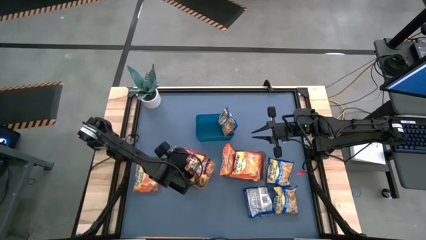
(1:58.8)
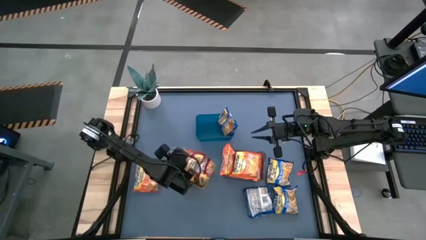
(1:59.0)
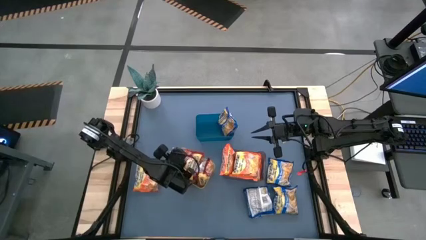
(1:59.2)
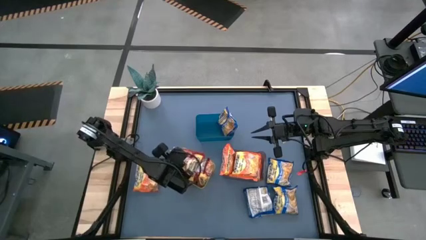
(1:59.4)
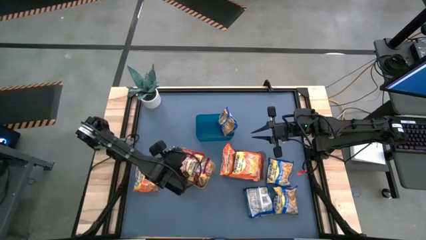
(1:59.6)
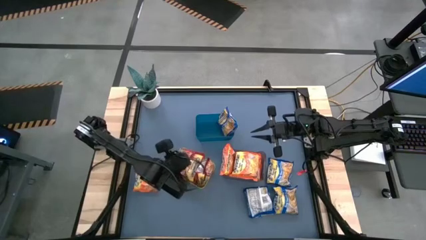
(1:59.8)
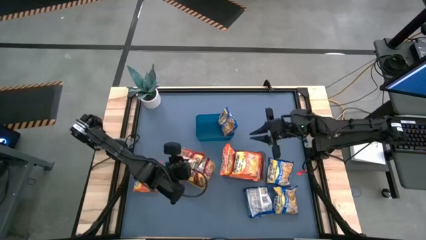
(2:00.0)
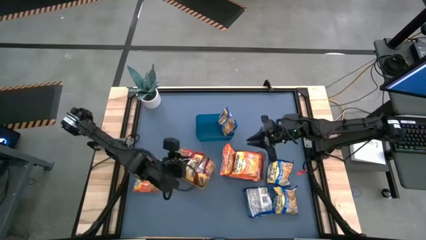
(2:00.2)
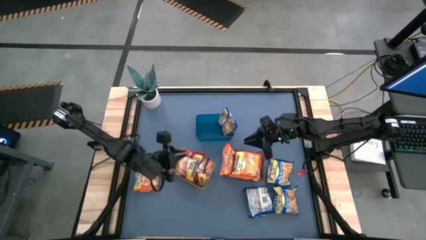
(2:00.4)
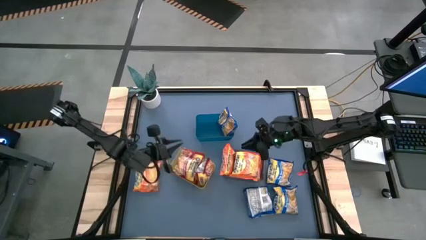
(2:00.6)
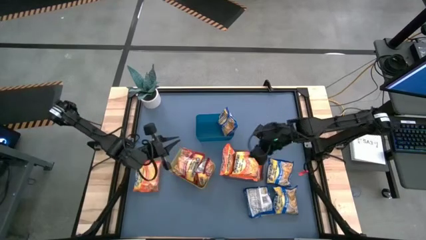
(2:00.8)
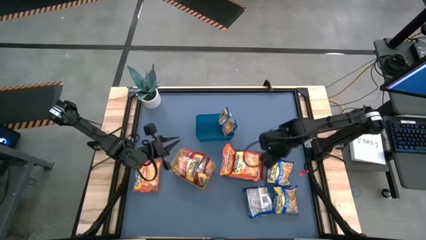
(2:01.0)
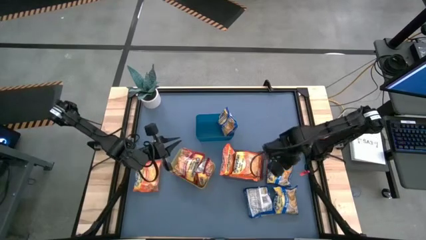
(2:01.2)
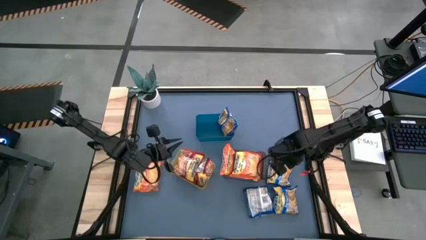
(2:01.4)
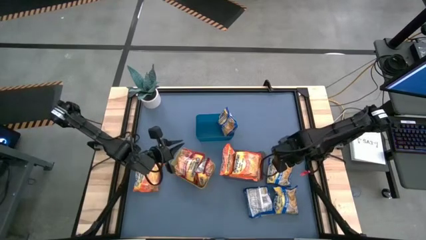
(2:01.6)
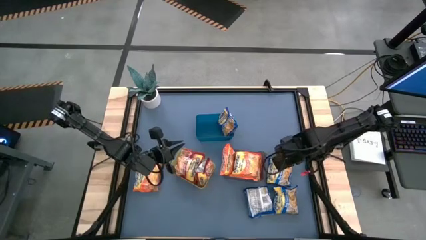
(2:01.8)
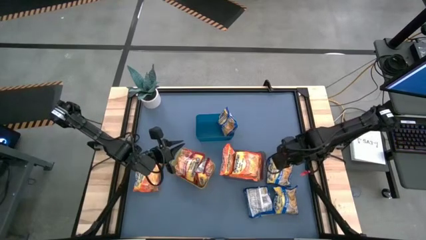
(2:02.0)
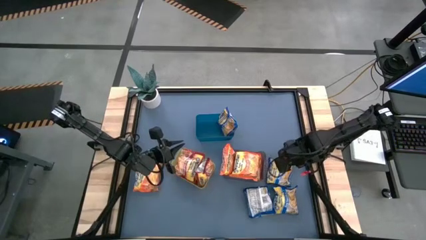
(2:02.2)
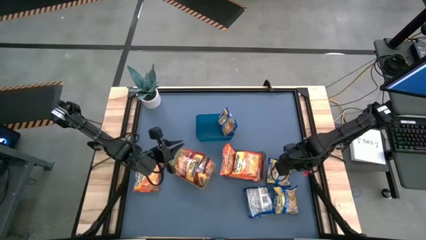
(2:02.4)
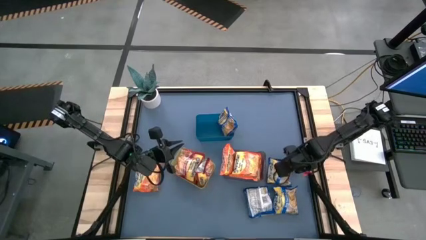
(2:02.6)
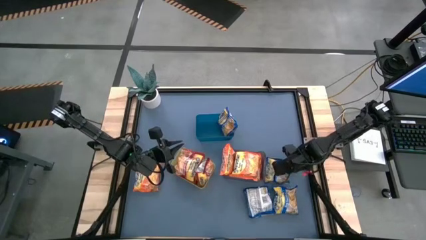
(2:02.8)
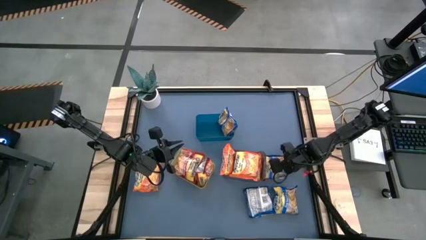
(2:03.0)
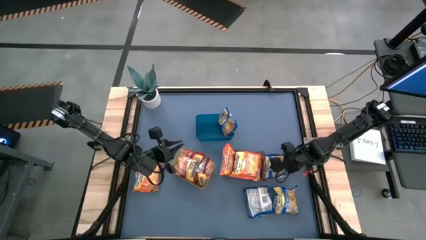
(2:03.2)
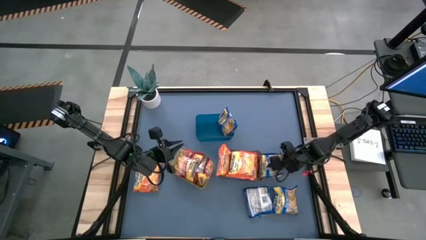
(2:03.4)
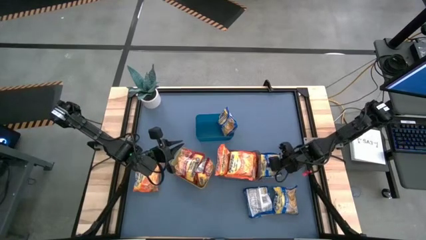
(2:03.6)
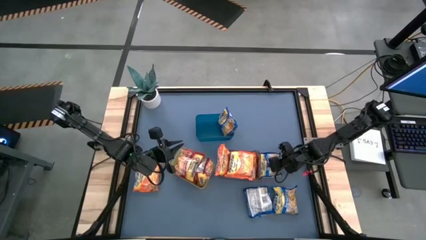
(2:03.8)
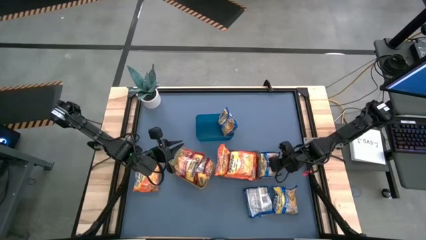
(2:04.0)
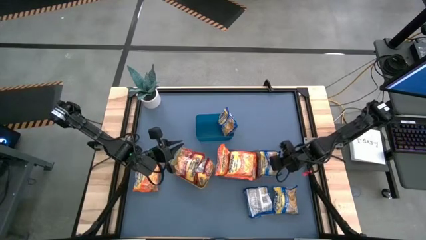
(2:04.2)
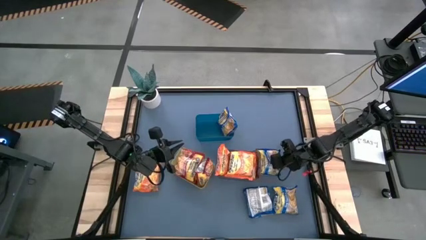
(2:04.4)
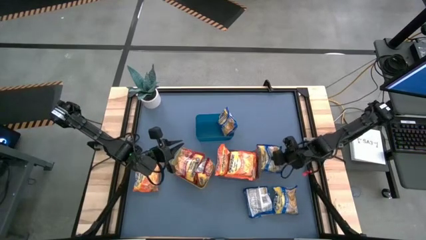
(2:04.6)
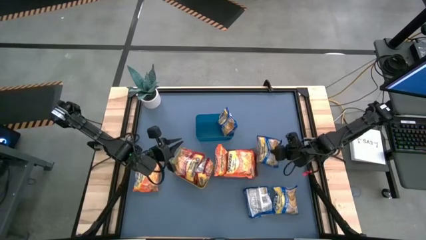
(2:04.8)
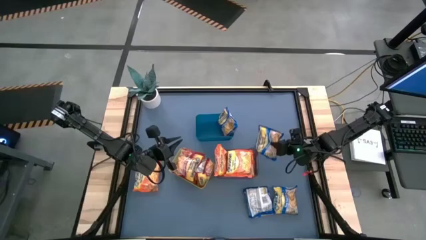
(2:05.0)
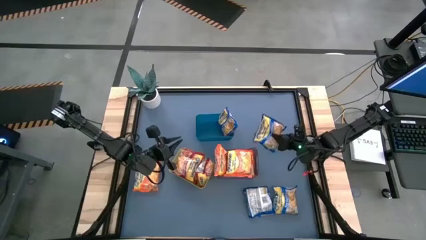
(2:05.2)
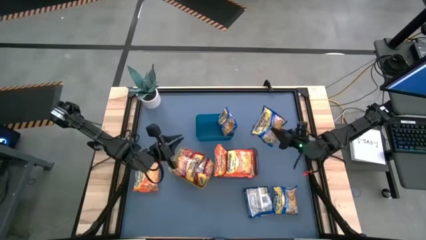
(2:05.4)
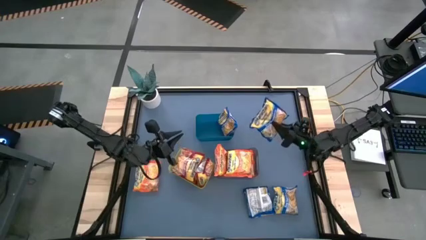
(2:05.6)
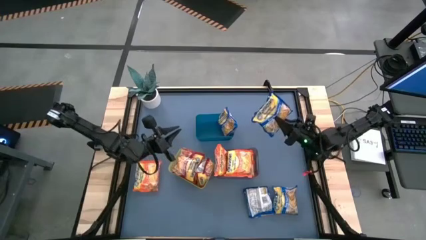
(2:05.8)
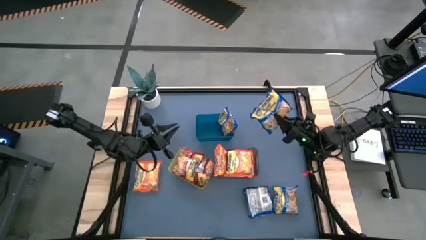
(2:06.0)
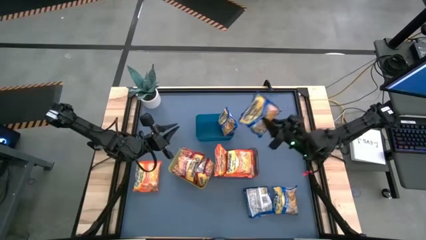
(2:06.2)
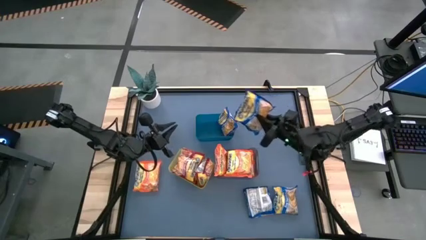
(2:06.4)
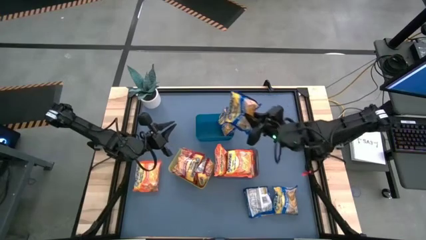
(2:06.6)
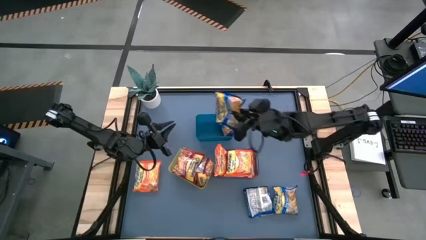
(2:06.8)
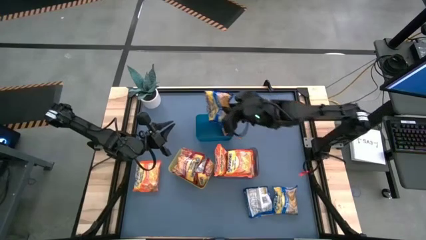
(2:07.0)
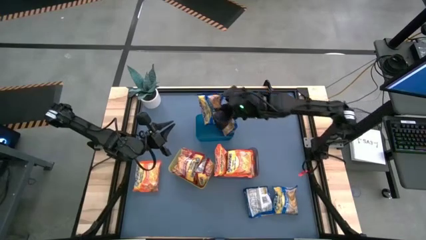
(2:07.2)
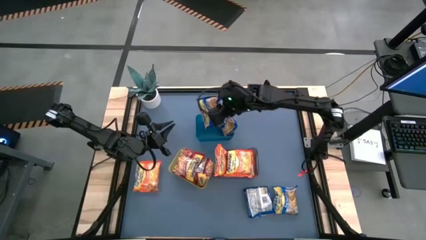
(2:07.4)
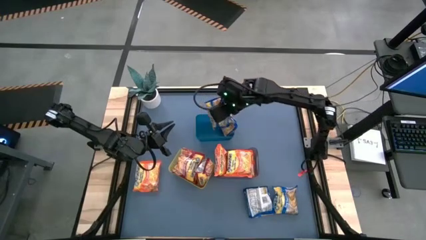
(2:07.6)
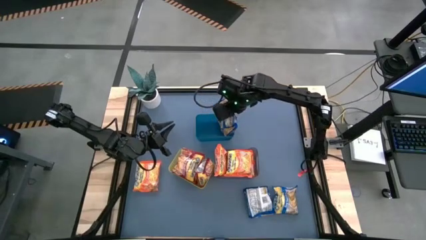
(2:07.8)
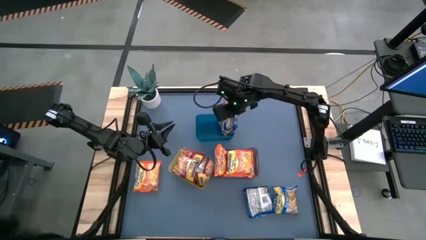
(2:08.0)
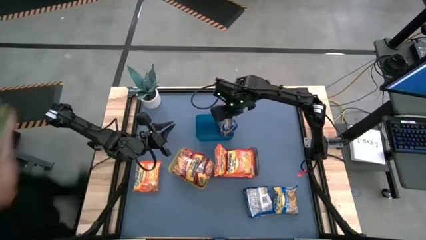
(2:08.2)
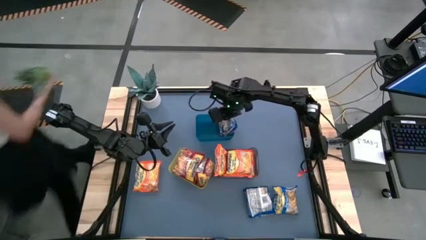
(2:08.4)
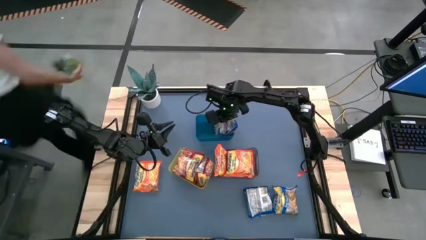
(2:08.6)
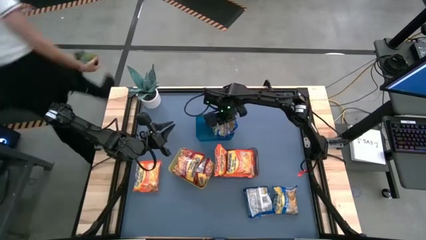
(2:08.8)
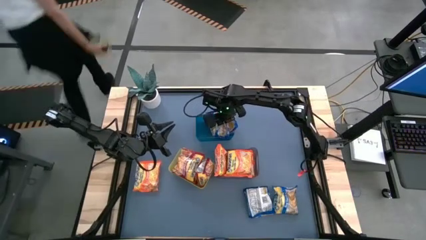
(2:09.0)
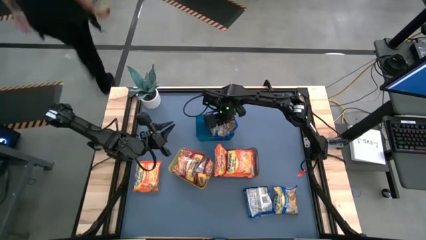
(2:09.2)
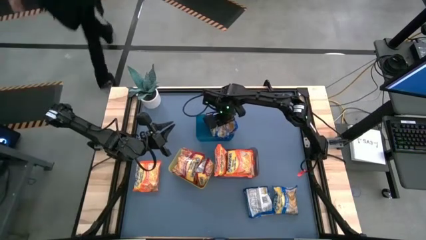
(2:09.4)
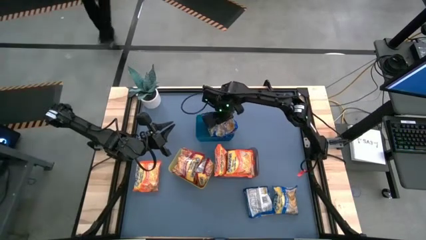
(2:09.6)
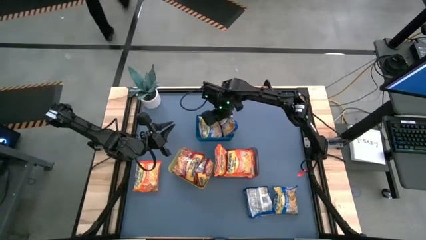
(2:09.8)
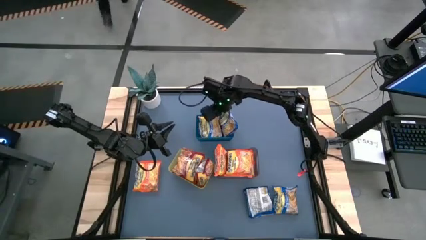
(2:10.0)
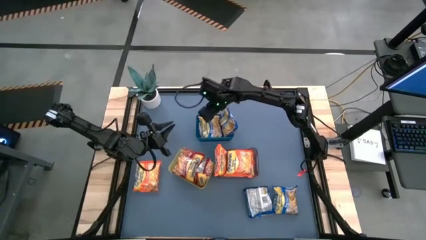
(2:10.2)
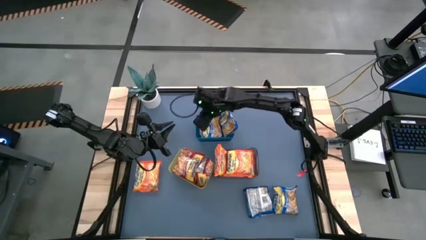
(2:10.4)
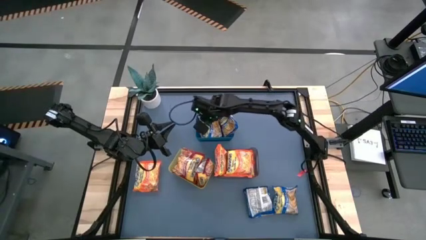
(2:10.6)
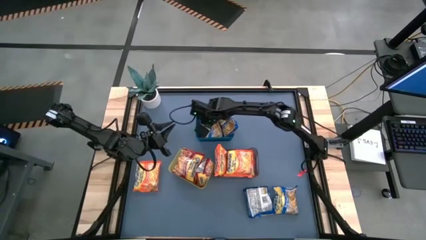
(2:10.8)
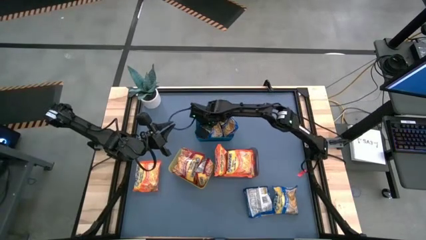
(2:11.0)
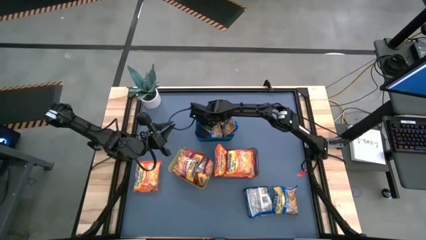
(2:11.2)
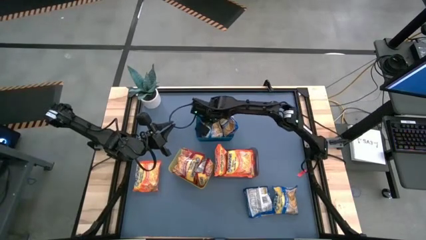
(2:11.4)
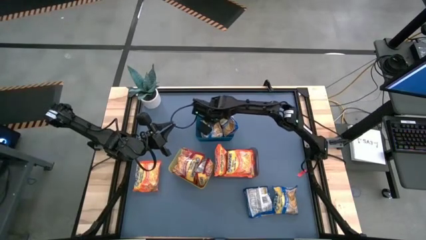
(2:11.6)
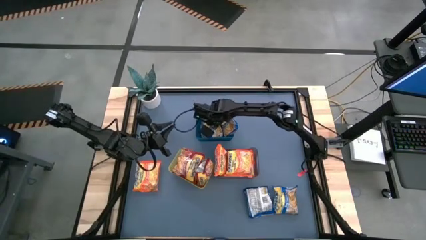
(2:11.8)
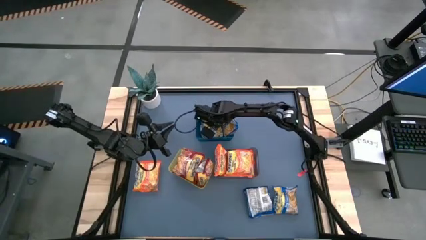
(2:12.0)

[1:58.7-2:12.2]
Task: Sort Maruchan noodles
Put the blue noodle pack into the blue bin

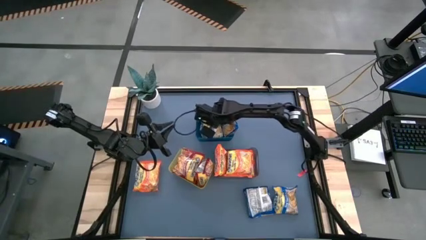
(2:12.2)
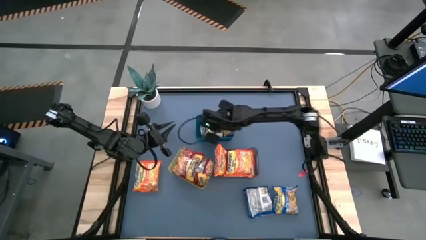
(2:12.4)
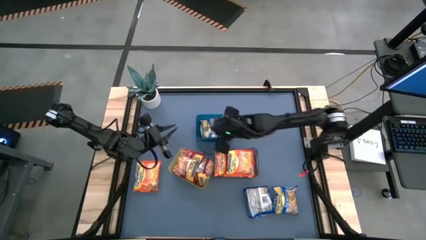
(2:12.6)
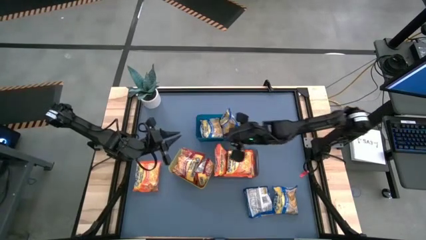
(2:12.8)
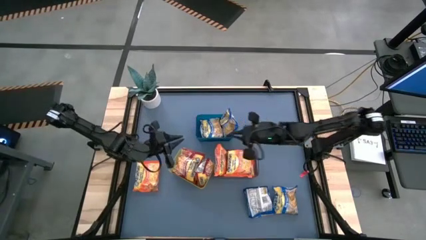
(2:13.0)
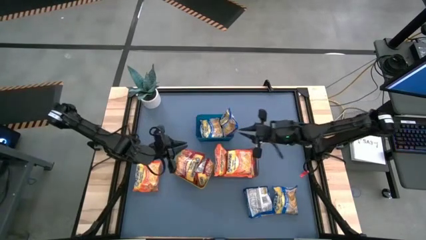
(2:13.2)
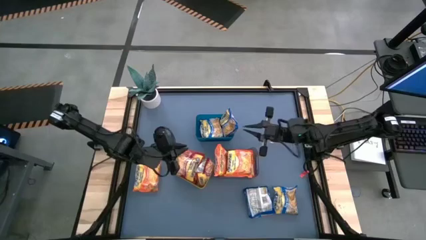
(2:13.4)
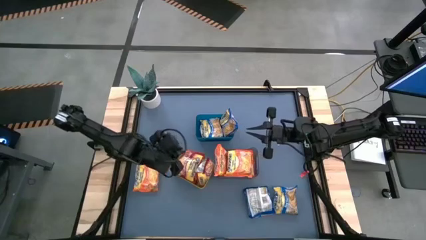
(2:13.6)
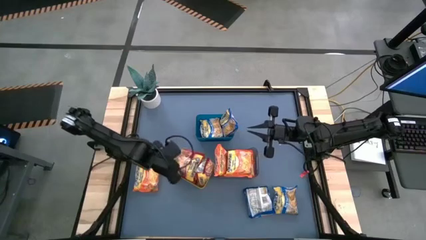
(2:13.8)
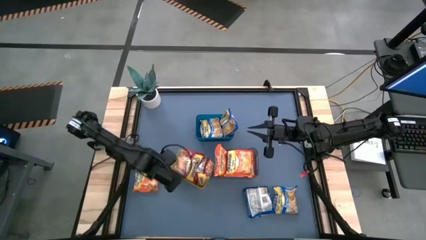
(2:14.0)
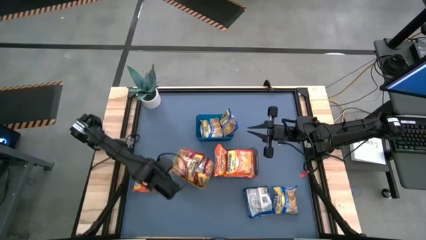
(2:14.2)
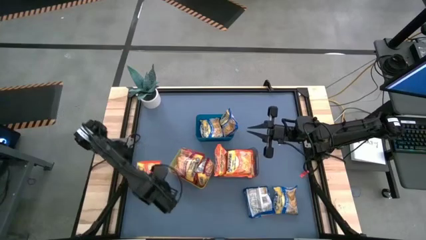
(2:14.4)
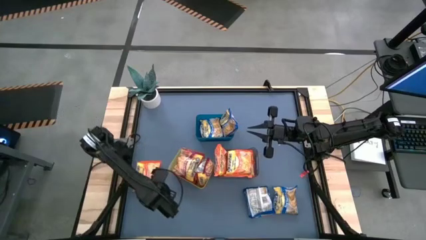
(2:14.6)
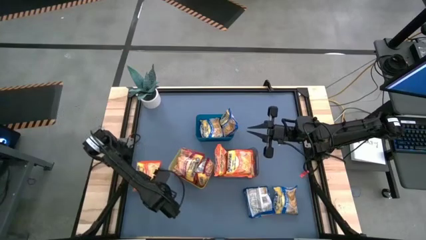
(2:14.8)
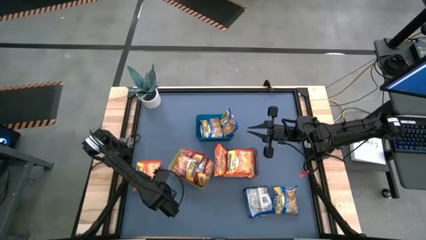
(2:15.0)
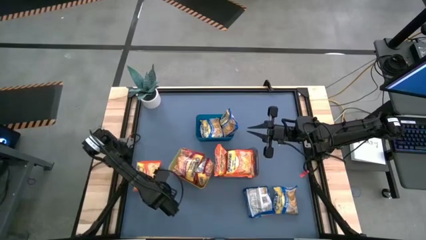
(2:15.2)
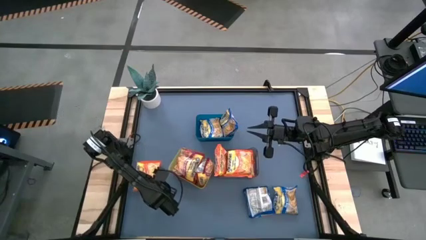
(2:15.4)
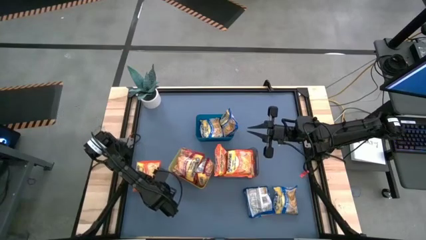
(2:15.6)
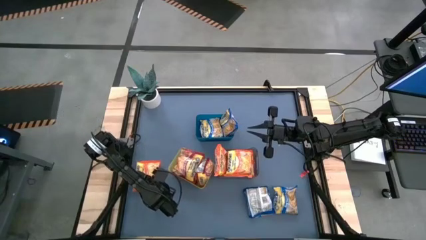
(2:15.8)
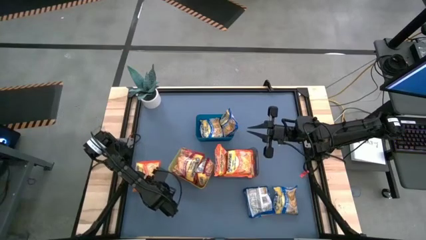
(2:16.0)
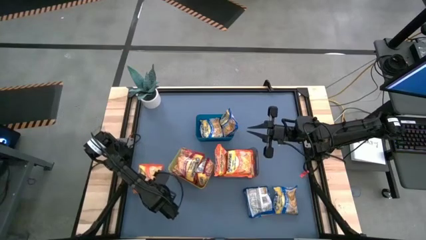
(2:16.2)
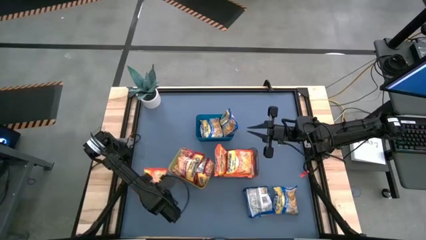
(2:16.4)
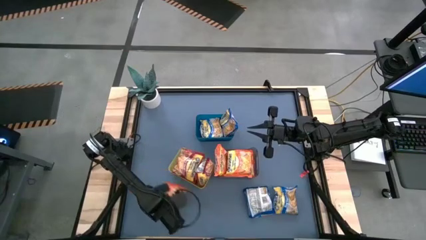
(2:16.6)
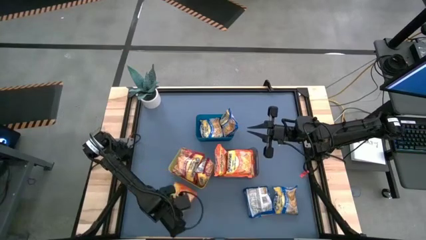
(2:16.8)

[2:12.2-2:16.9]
Stack the orange noodle pack on top of the orange noodle pack in the black bin
